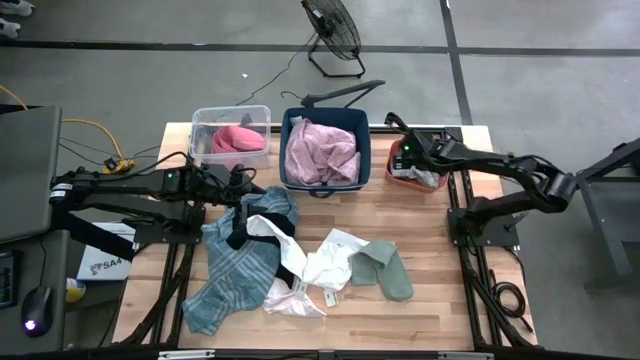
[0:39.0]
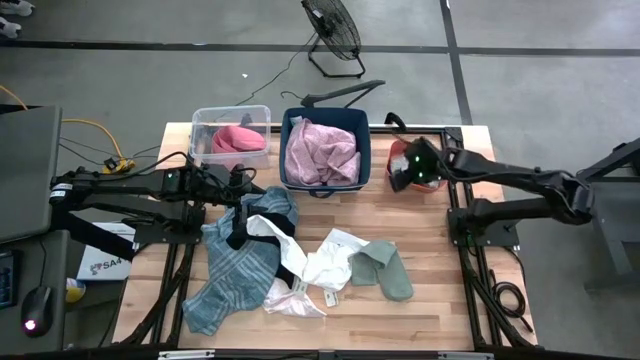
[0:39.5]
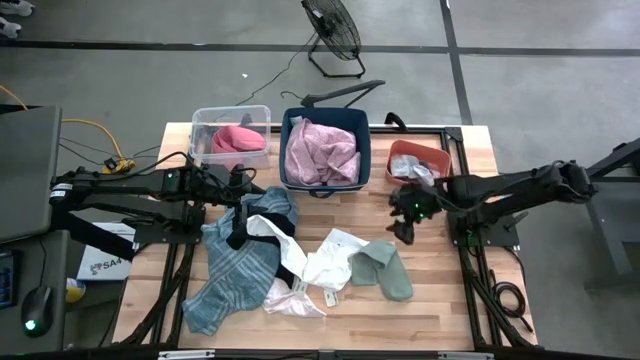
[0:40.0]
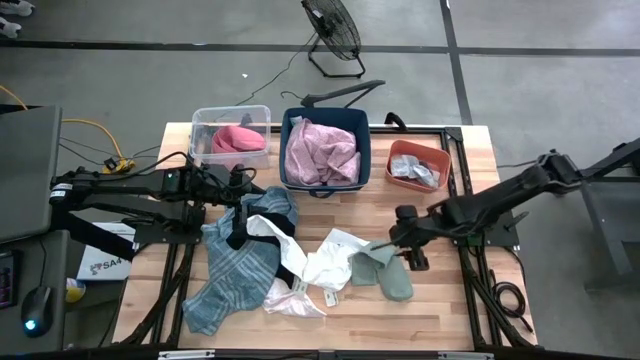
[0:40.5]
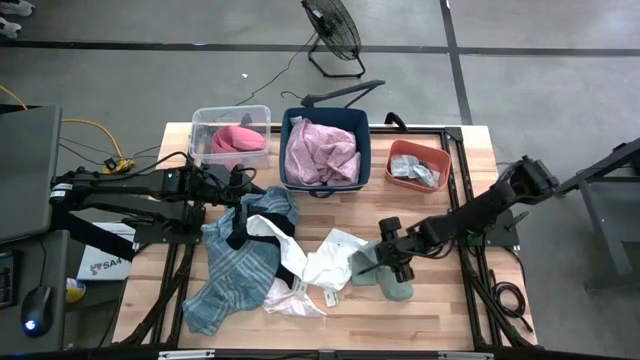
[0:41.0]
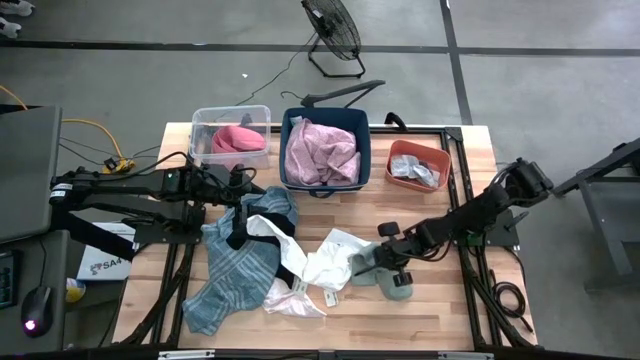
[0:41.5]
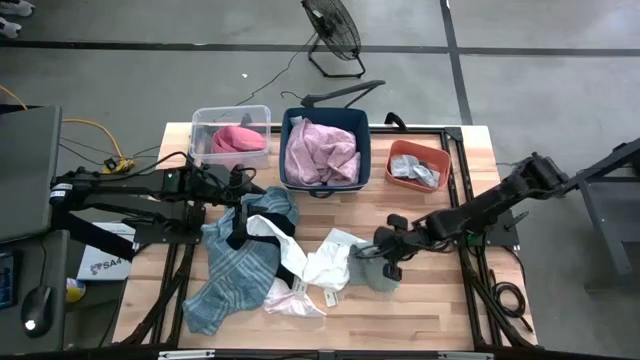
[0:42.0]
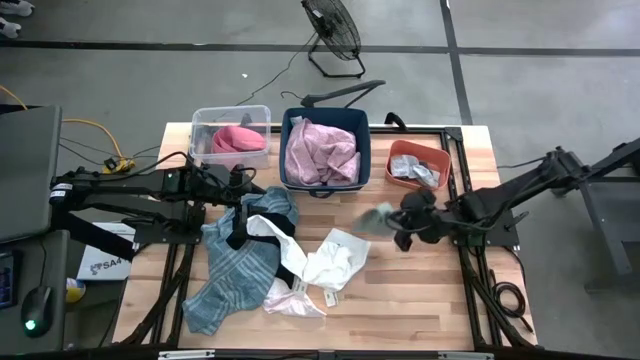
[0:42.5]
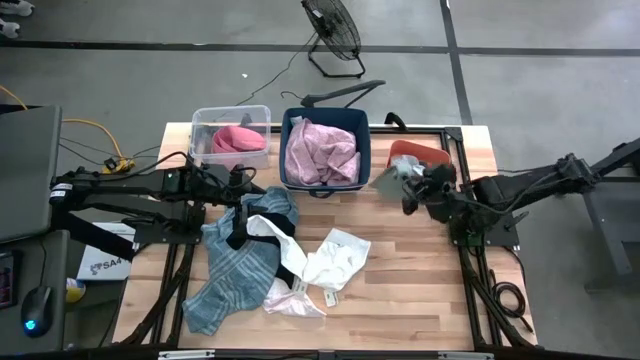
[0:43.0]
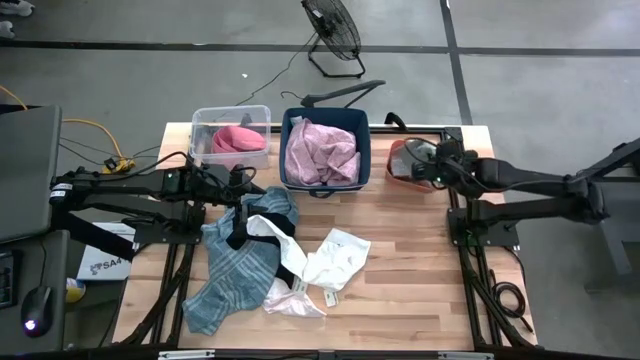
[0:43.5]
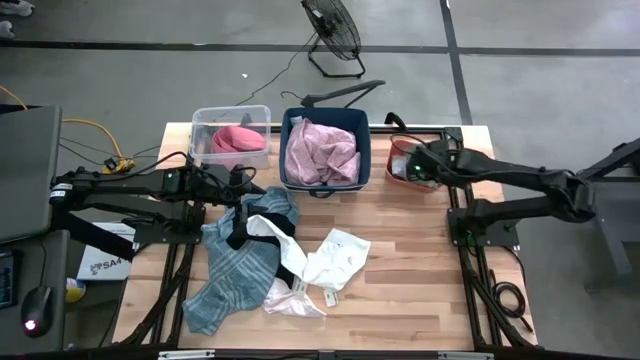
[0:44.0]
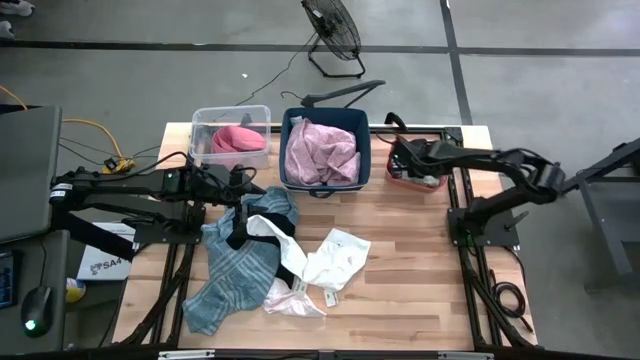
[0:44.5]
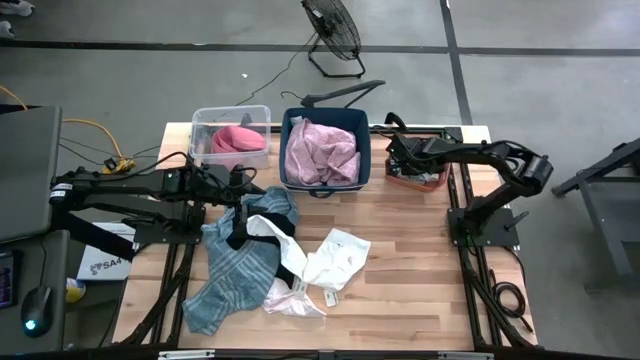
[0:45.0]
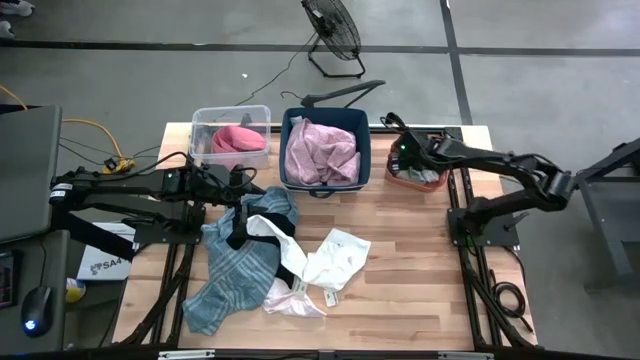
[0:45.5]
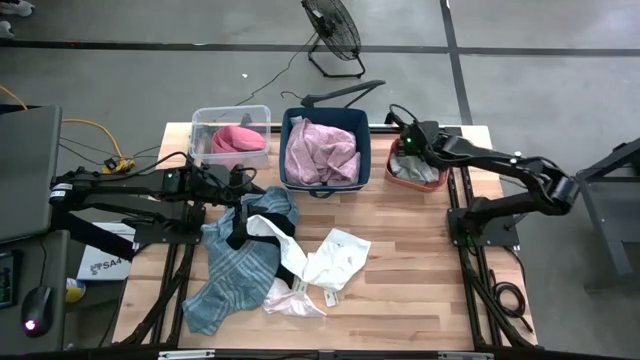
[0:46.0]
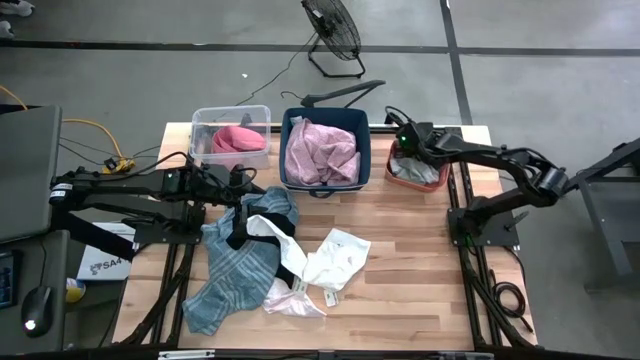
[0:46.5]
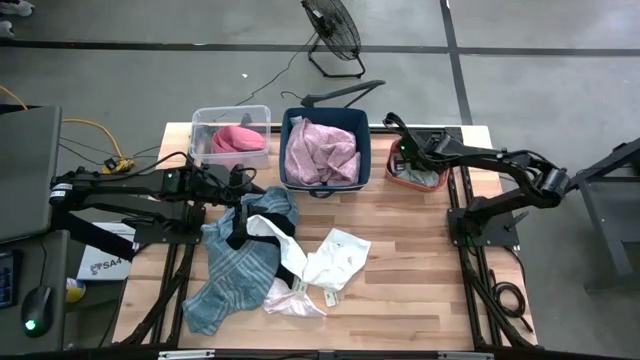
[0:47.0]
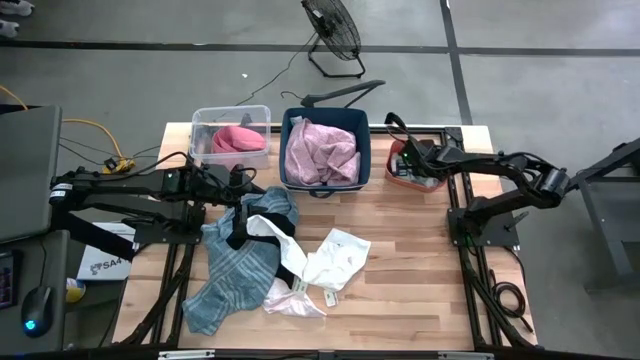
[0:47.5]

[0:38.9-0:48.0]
Task: Pick & Place Cloths
Put the dark gray sock into the orange bin

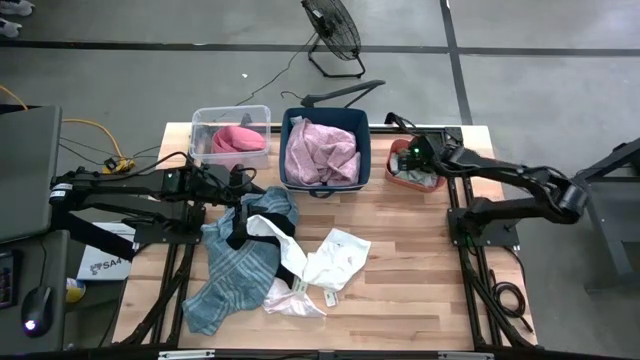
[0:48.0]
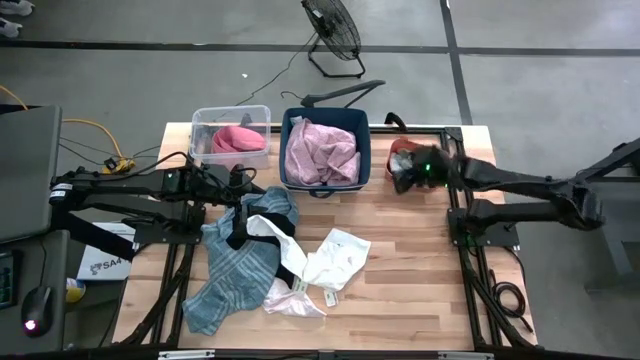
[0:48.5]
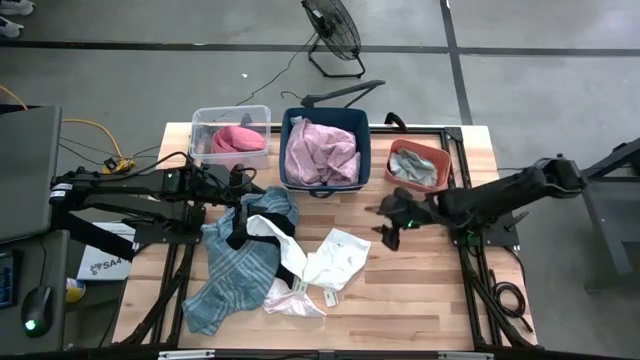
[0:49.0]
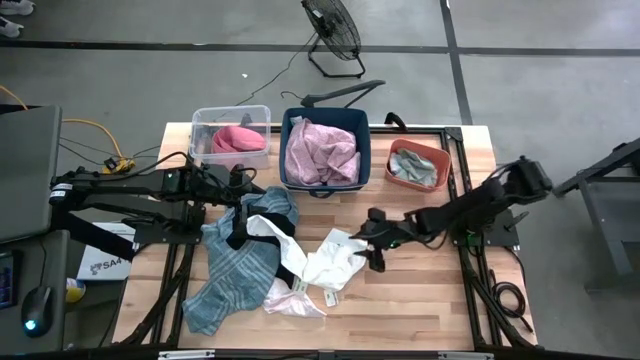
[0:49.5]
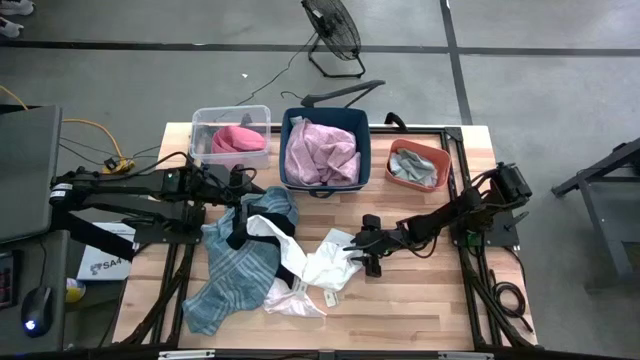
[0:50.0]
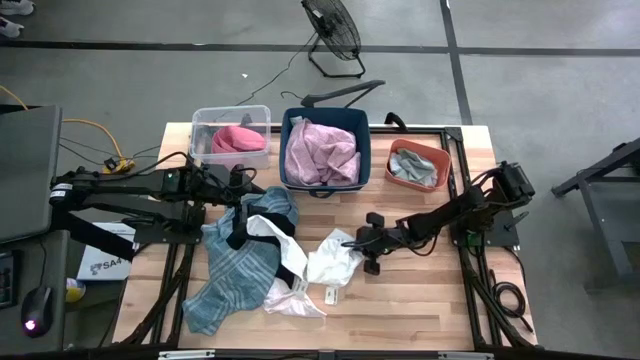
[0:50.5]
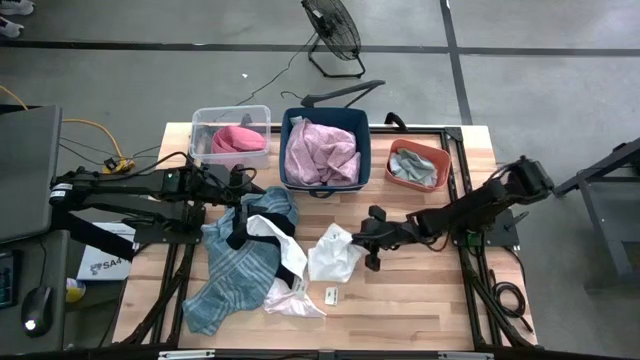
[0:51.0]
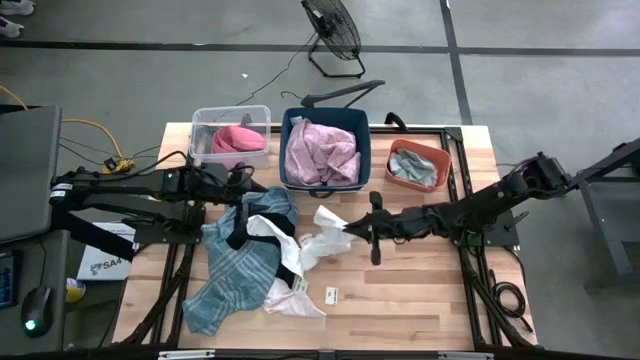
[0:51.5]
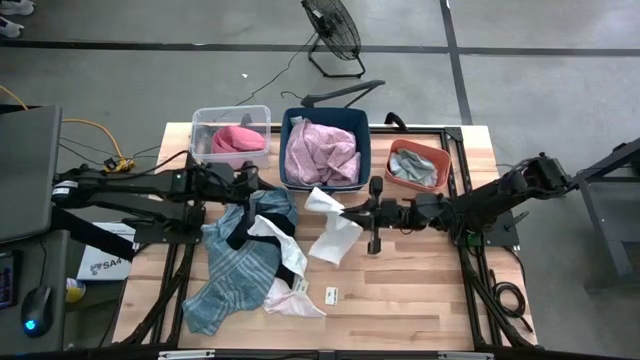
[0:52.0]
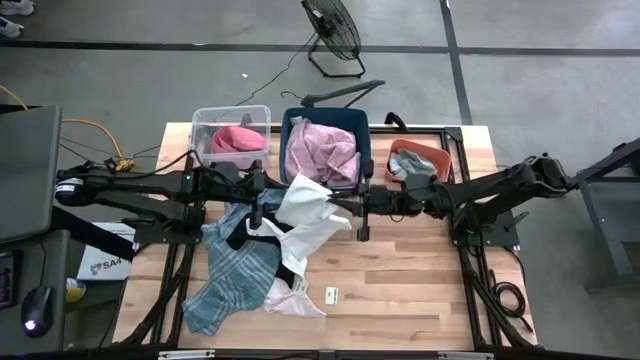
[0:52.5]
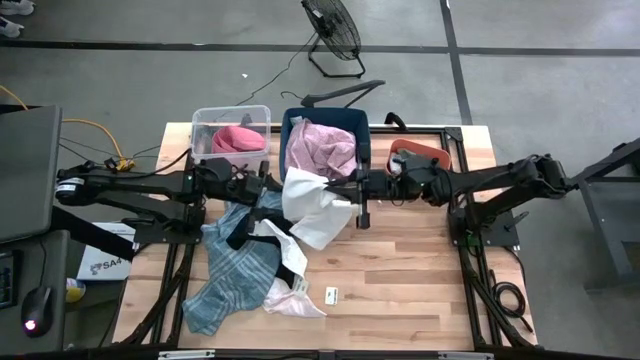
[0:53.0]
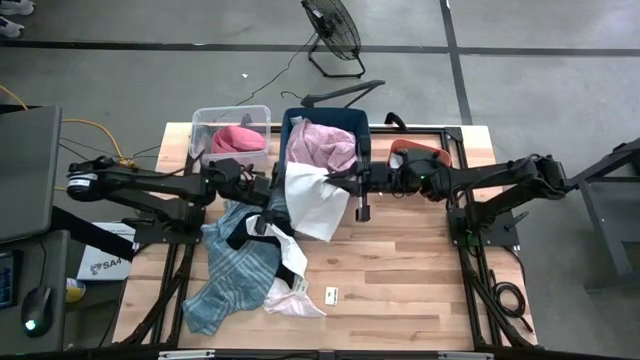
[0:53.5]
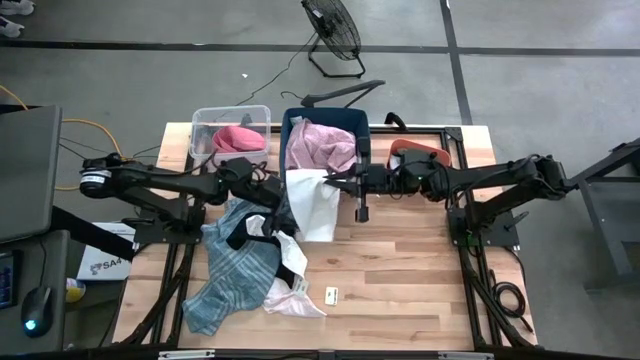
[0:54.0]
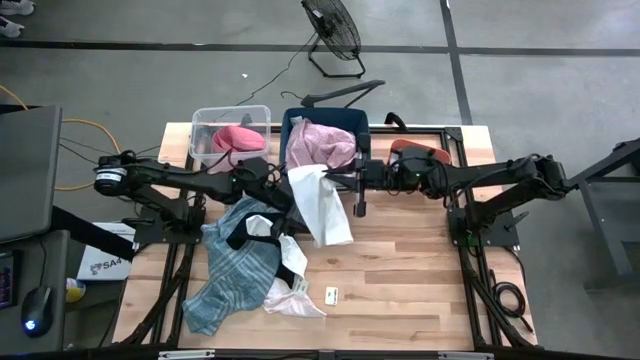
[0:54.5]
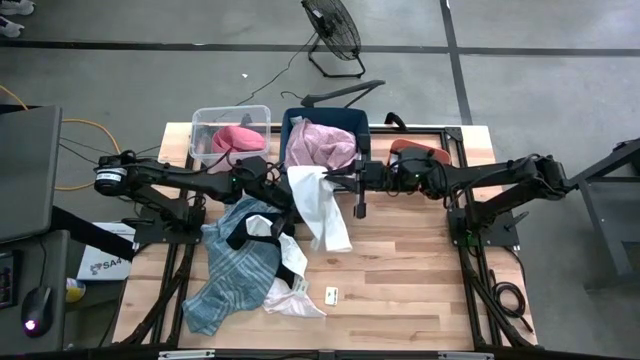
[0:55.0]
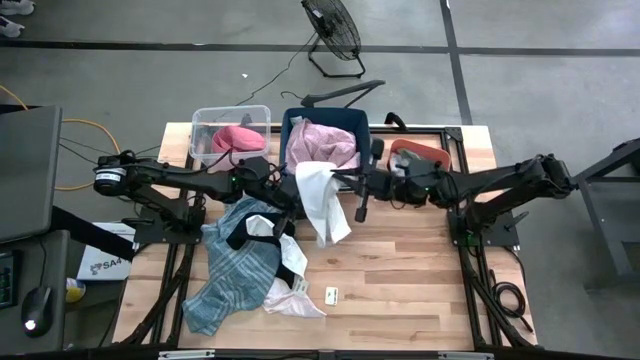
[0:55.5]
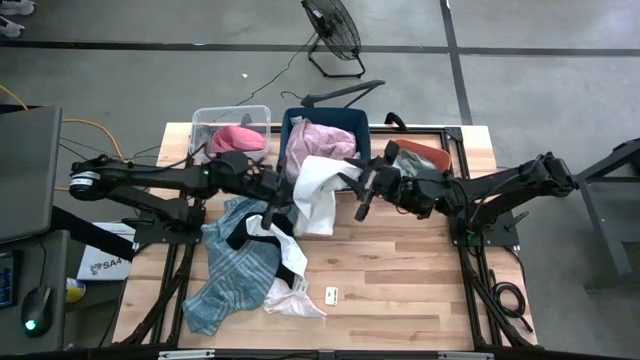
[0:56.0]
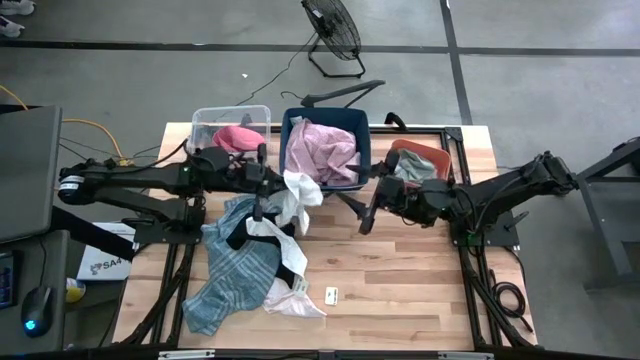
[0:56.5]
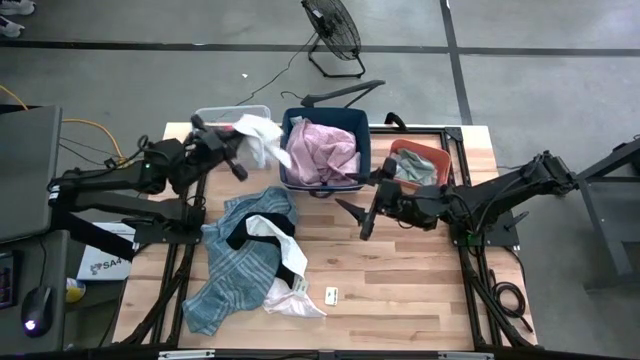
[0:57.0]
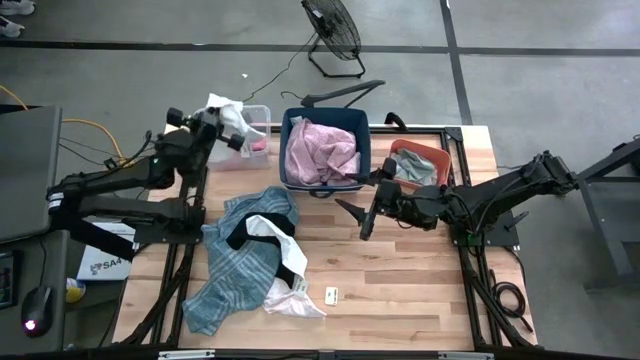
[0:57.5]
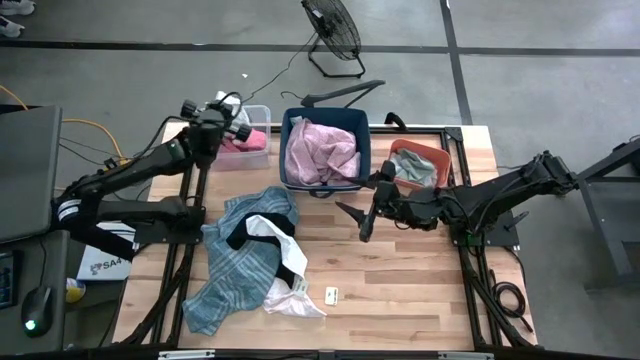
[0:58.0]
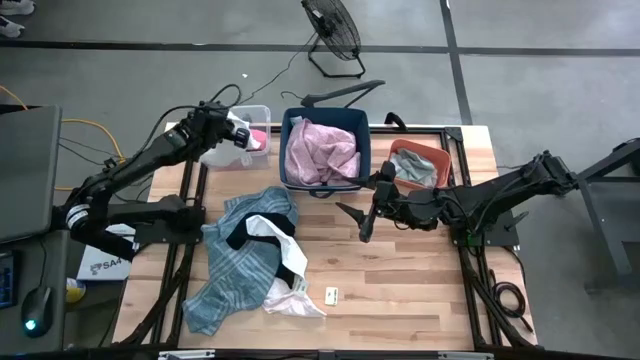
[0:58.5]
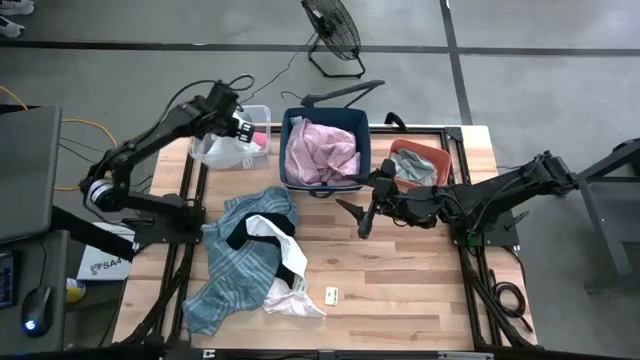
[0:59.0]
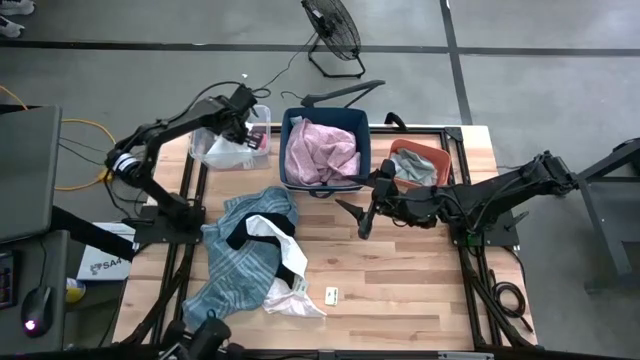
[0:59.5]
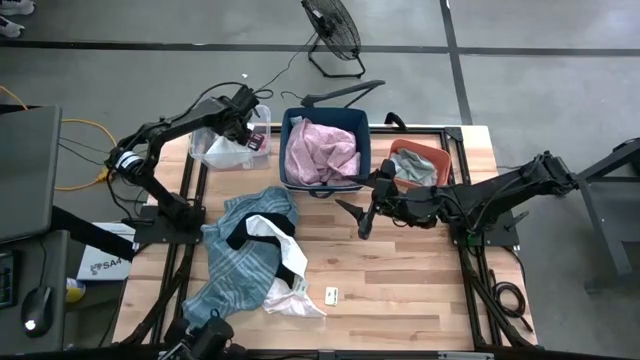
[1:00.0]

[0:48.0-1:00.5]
Put the white boxer into the transparent bin
